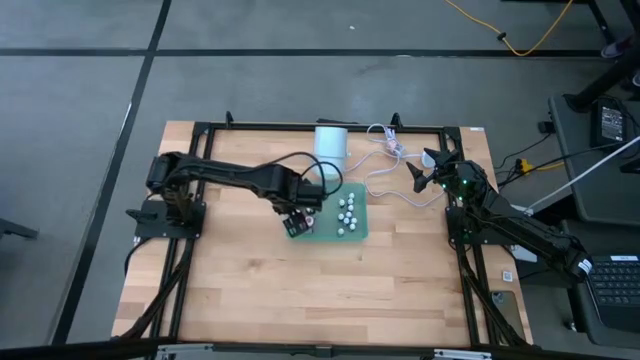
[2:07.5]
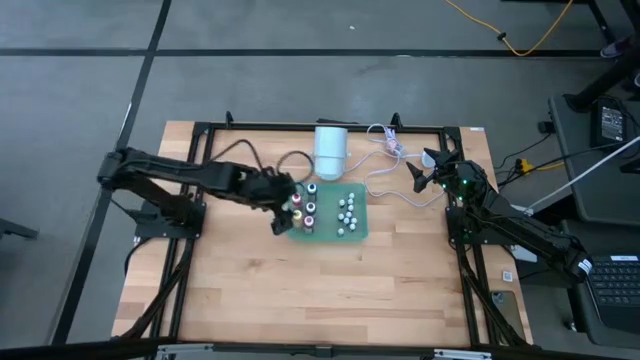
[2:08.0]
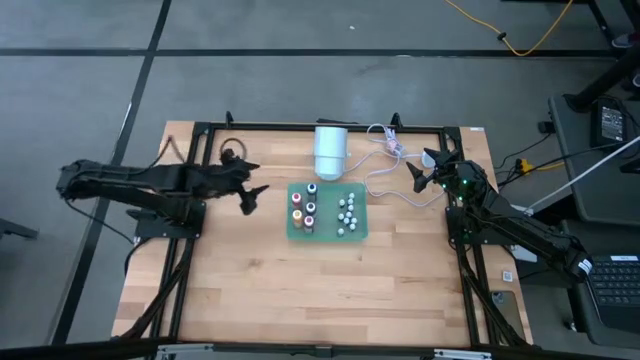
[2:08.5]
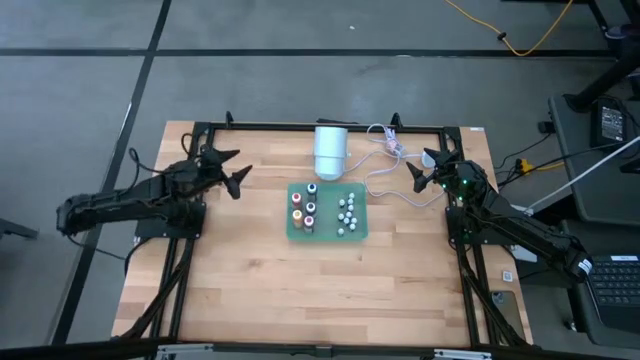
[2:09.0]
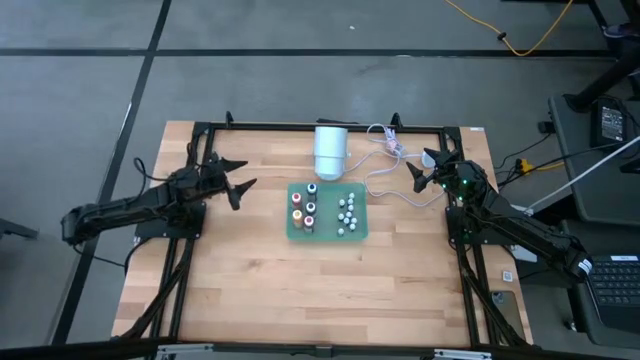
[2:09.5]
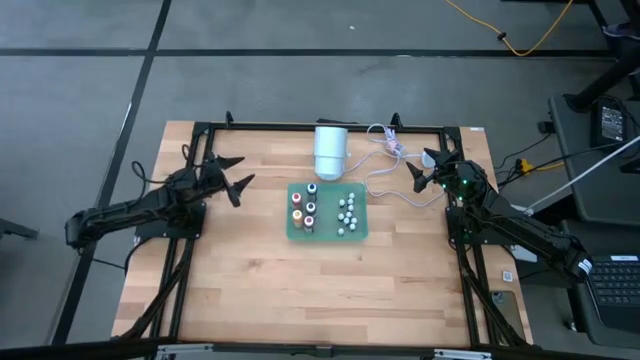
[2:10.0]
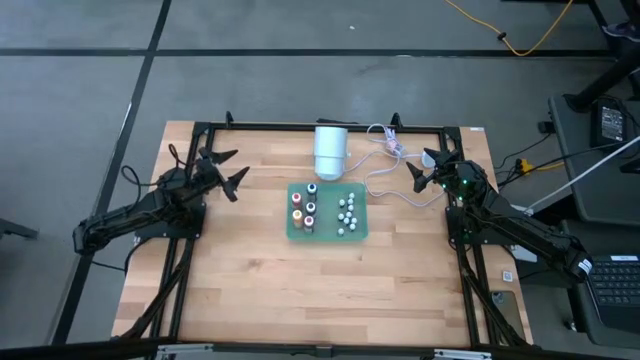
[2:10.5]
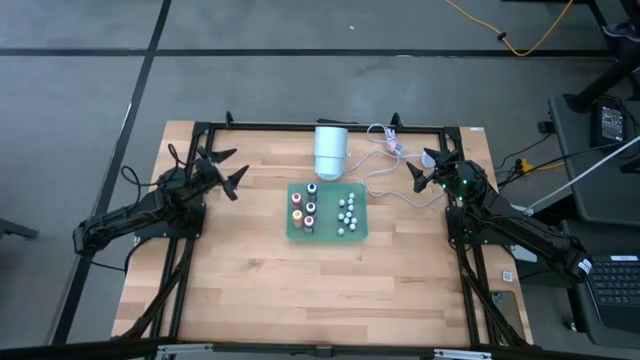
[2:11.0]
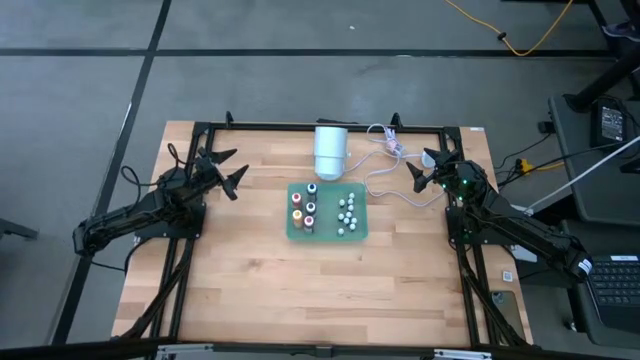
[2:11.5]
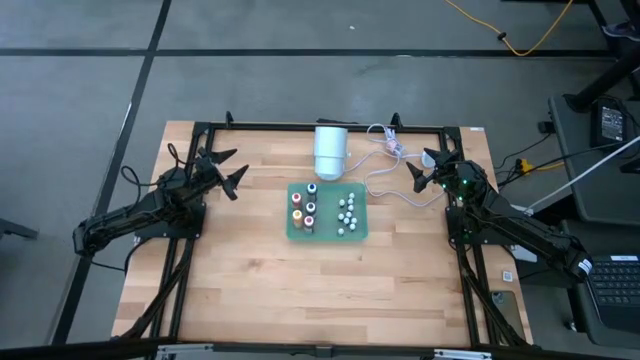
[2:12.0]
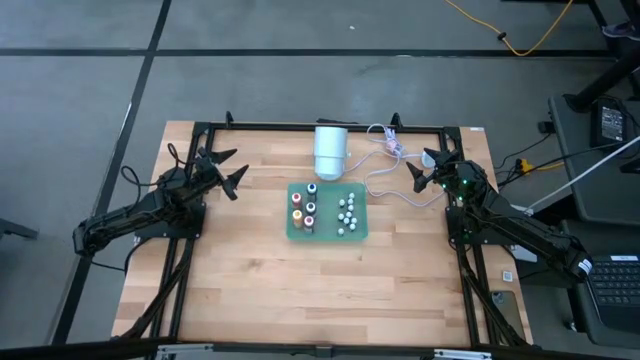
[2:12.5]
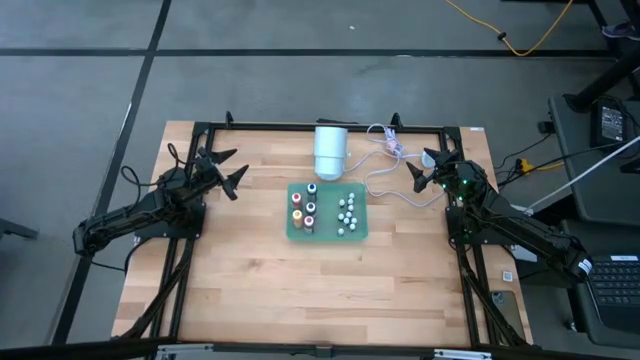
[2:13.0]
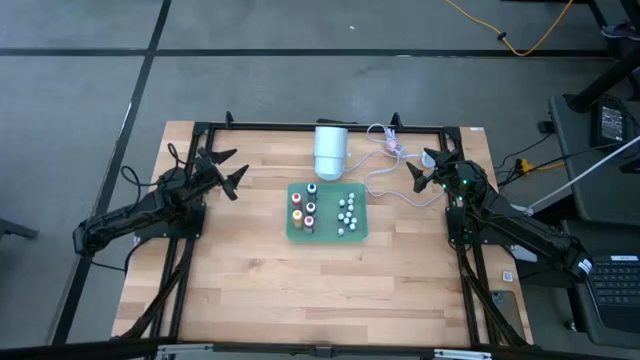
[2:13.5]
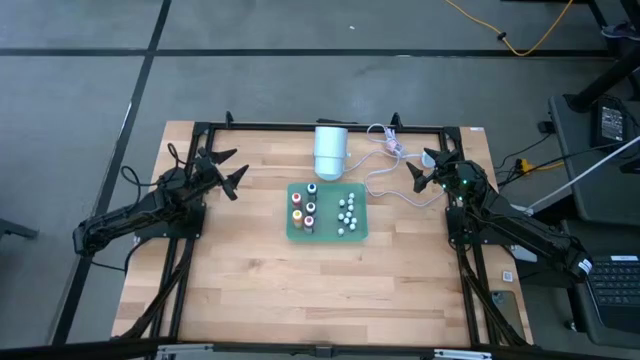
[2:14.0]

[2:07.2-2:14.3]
Task: Pick & Place food coloring
Return to Home Position

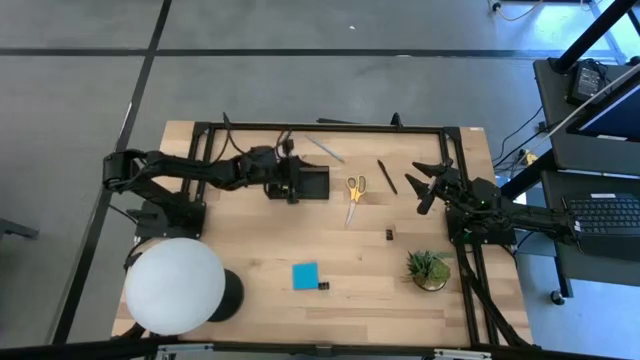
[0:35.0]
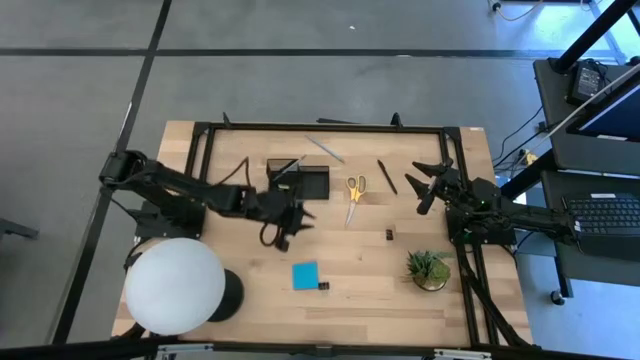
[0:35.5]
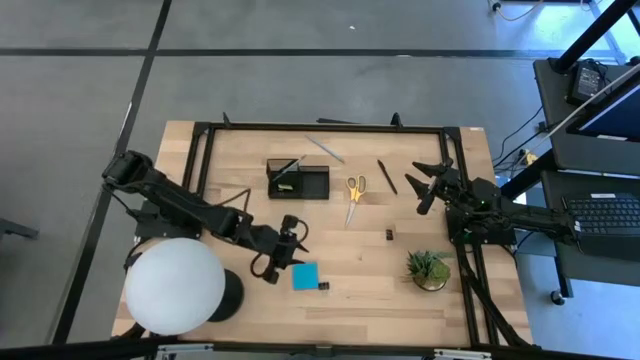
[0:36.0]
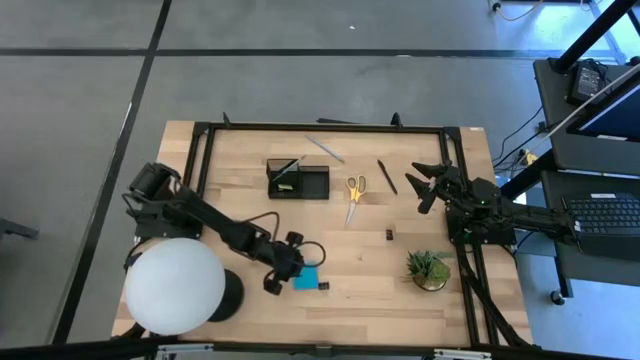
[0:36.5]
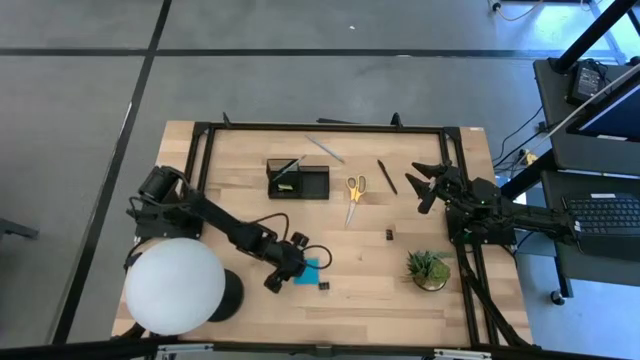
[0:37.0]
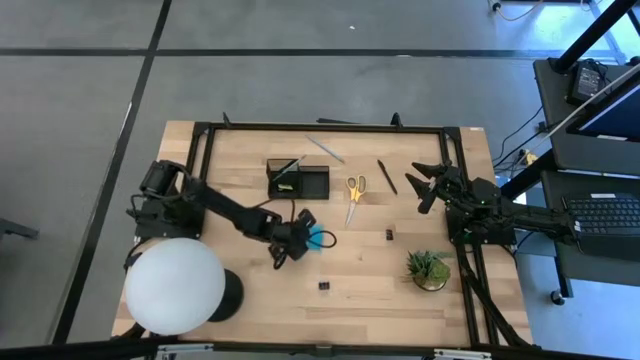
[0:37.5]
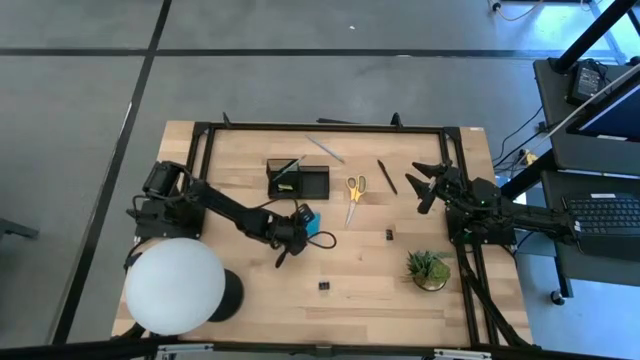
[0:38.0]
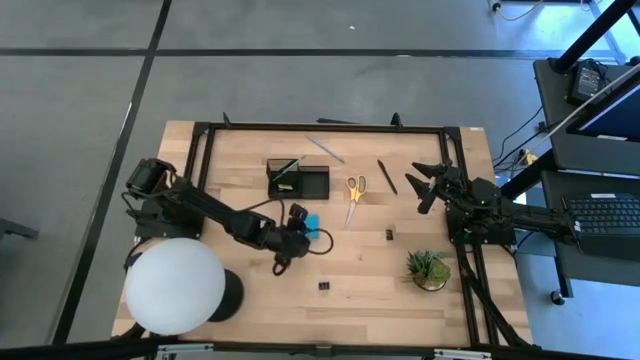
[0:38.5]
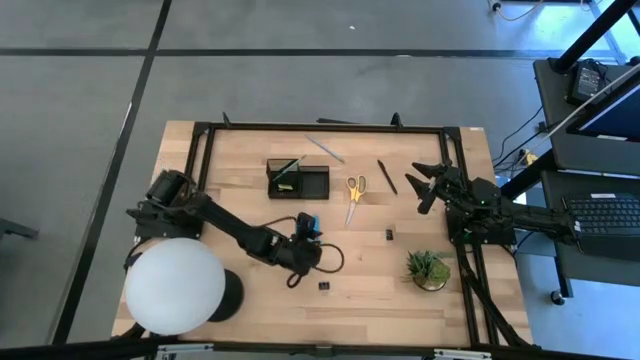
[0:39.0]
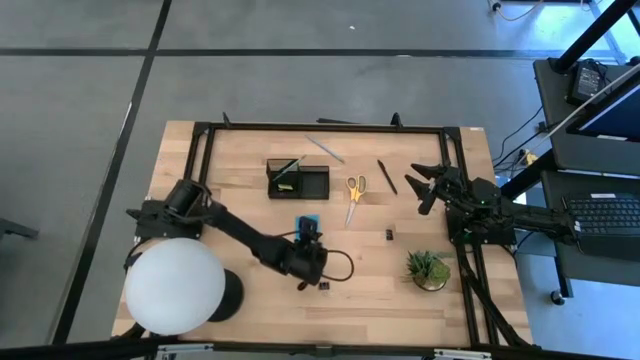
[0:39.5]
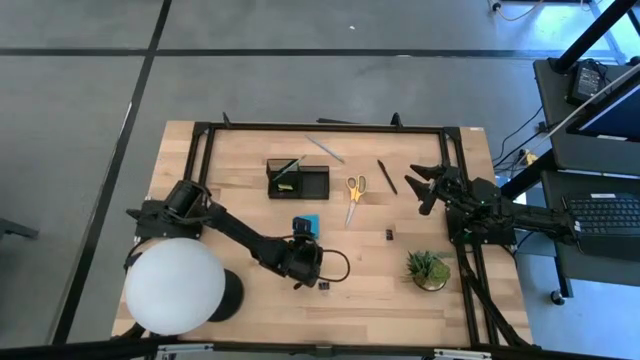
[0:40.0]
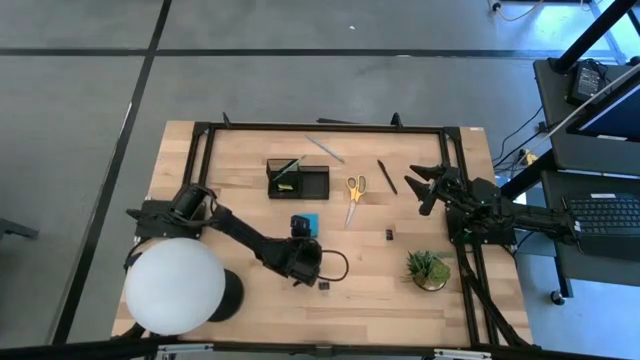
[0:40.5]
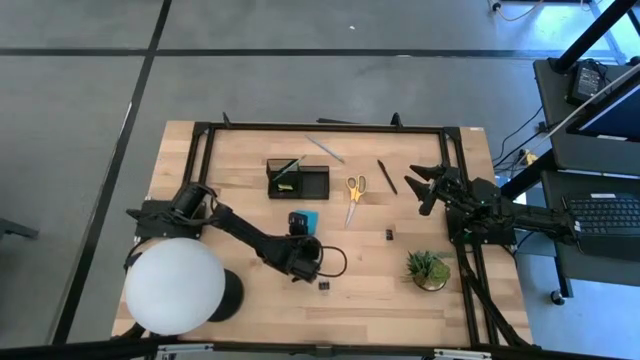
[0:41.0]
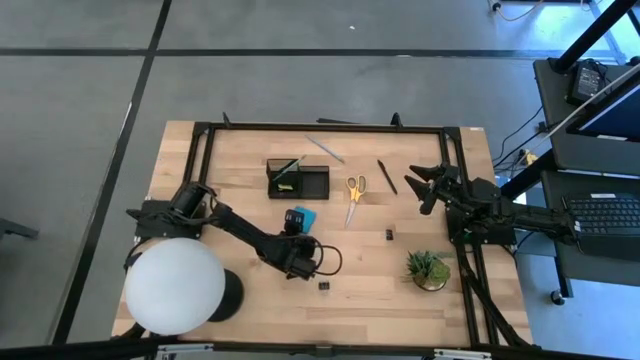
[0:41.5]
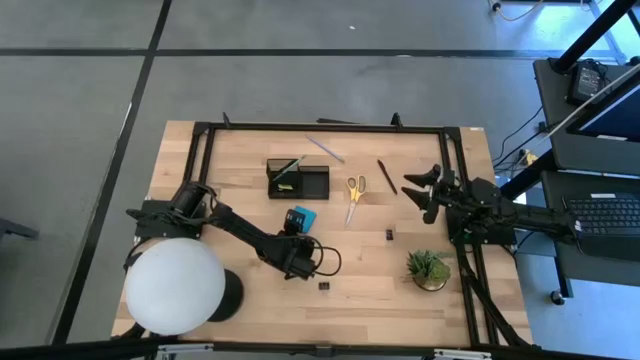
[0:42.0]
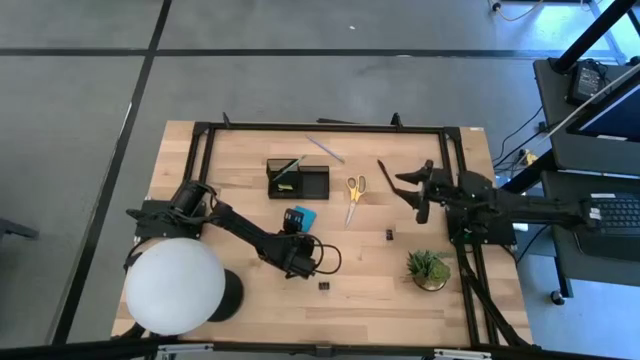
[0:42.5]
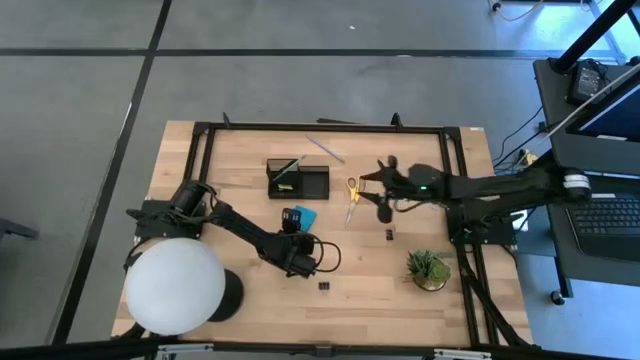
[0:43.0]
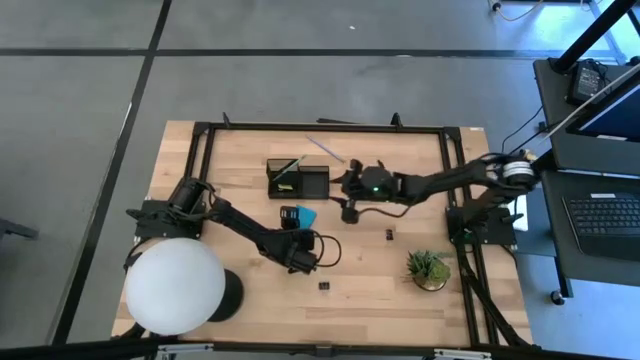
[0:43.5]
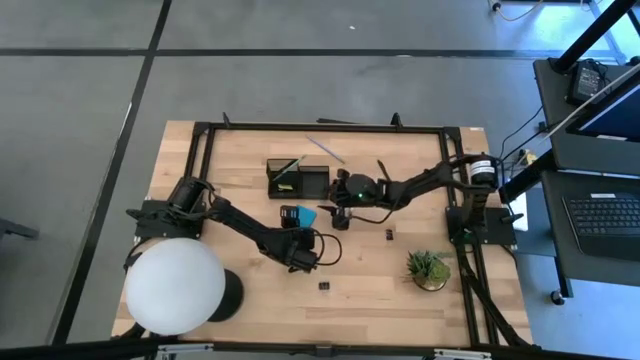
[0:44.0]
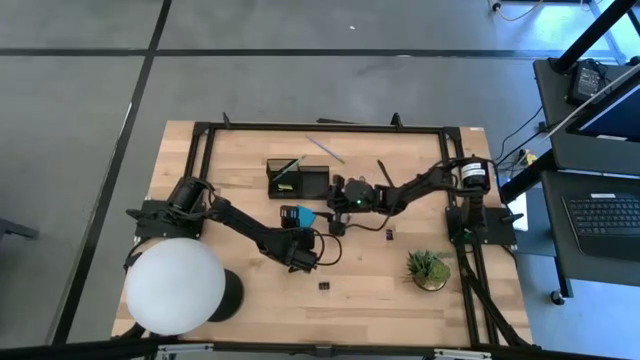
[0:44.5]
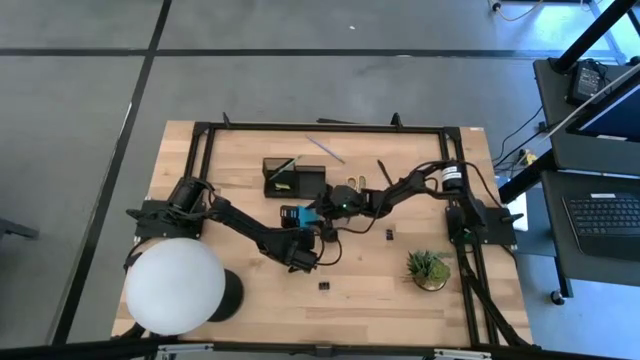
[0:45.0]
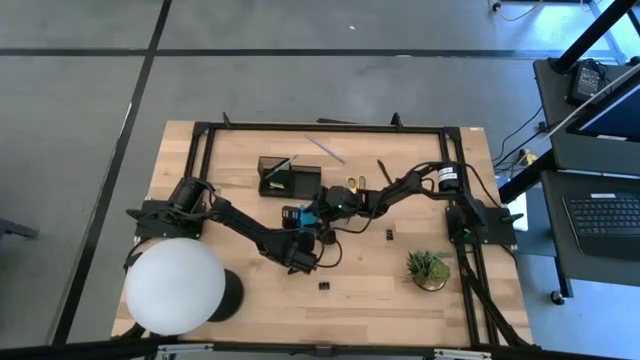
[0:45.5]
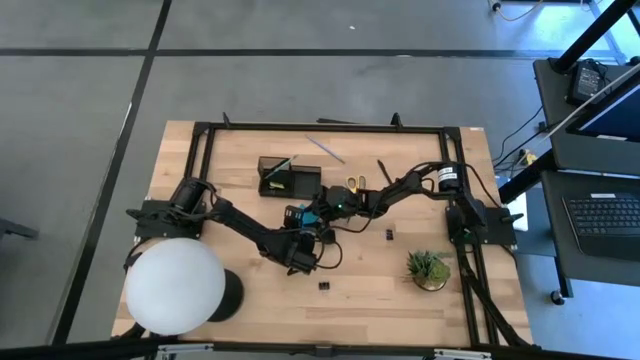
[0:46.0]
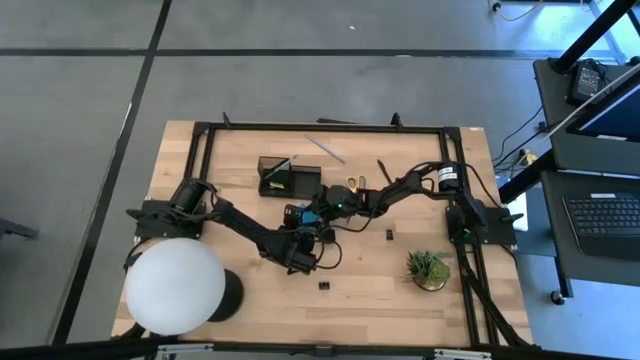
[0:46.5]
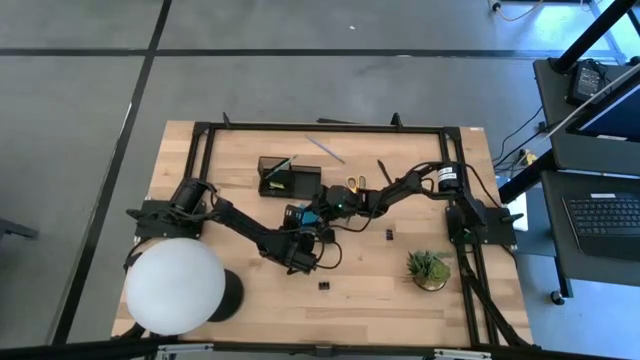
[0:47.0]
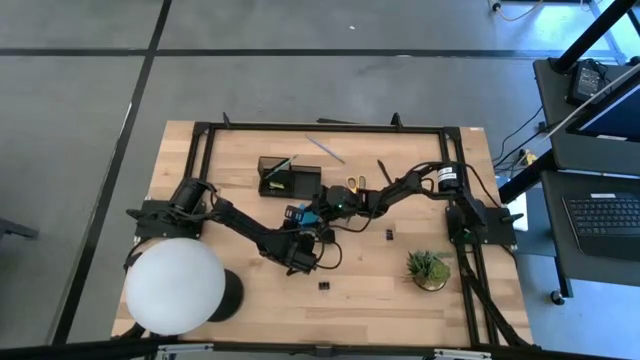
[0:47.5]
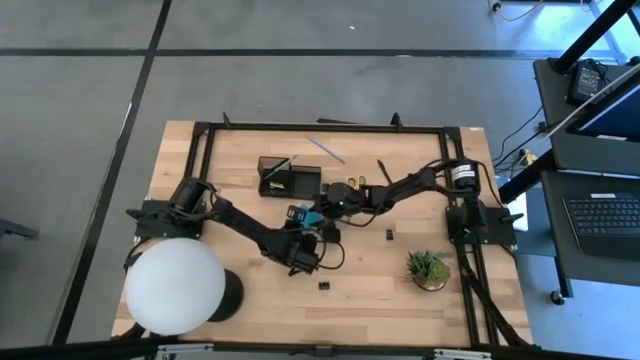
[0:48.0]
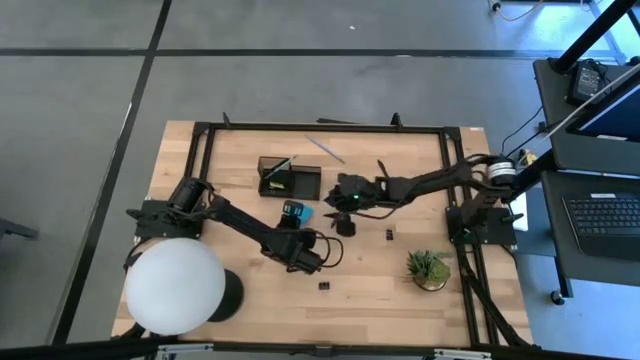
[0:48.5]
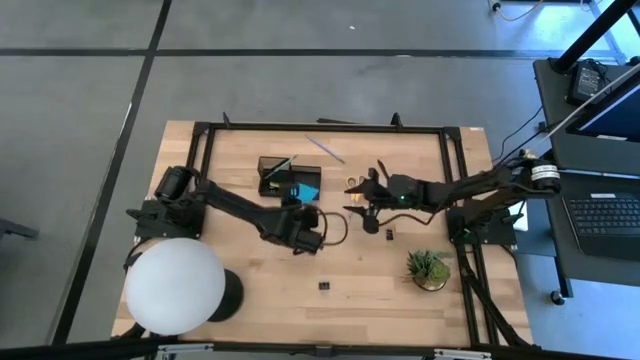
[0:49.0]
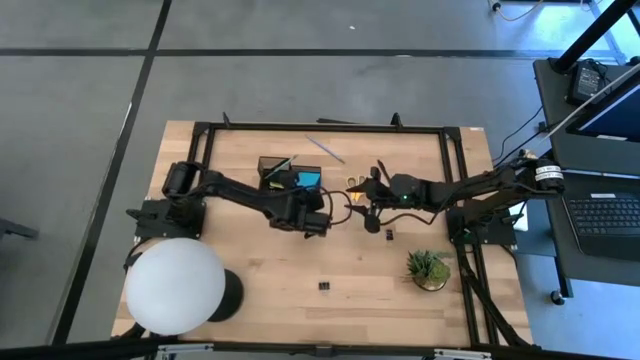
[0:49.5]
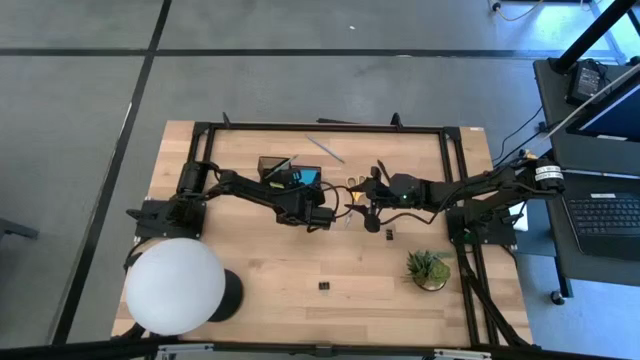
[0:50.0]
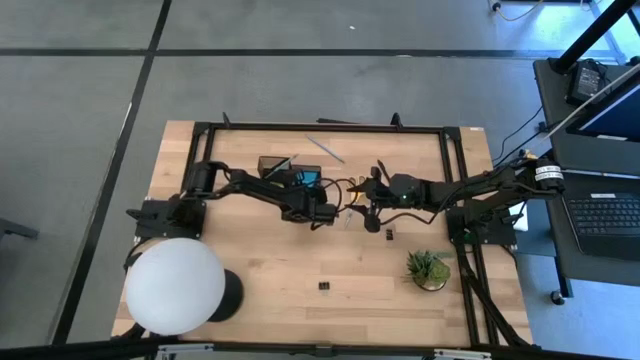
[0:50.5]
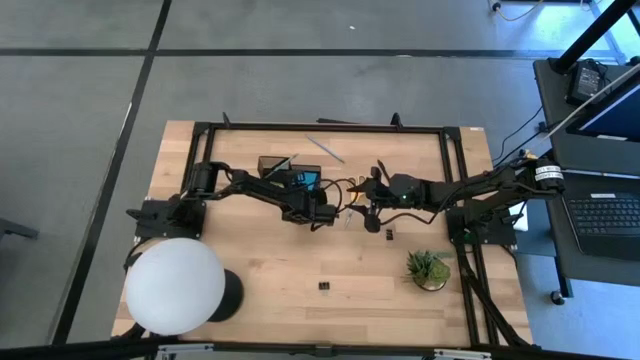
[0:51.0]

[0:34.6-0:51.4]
Task: Pick and place office supplies into organizer
Put the blue sticky notes into the black desk organizer
